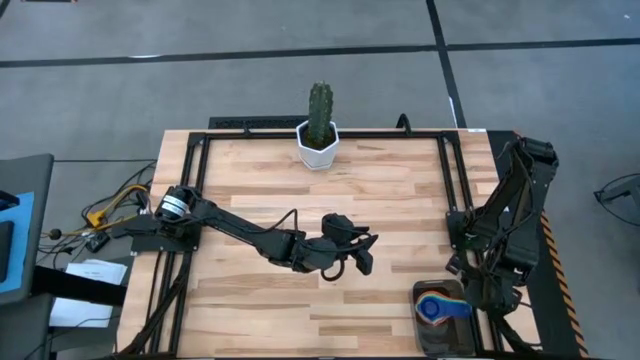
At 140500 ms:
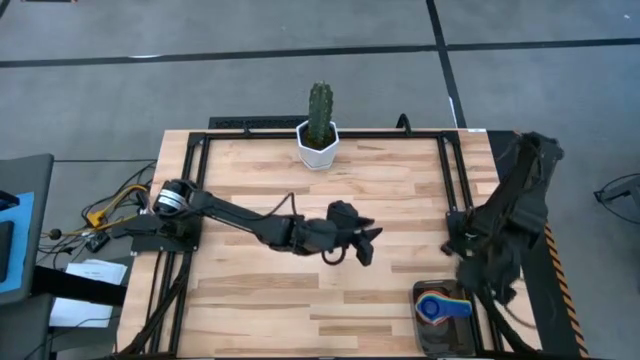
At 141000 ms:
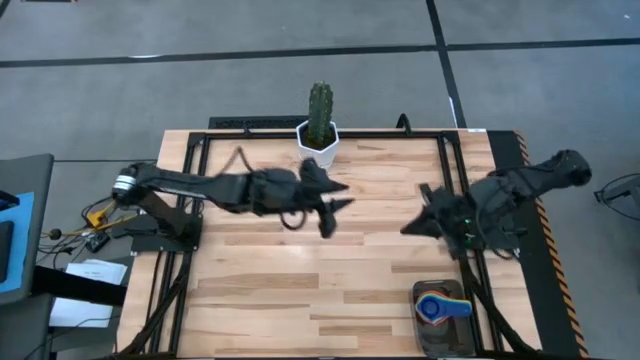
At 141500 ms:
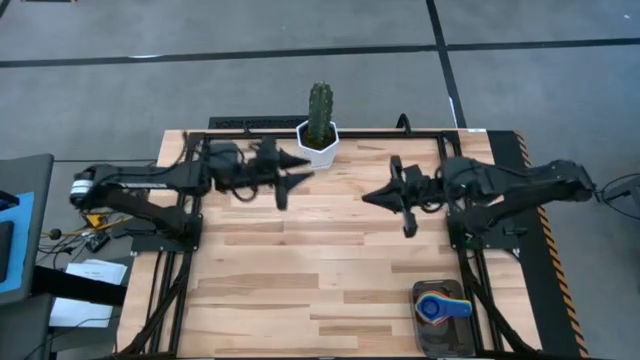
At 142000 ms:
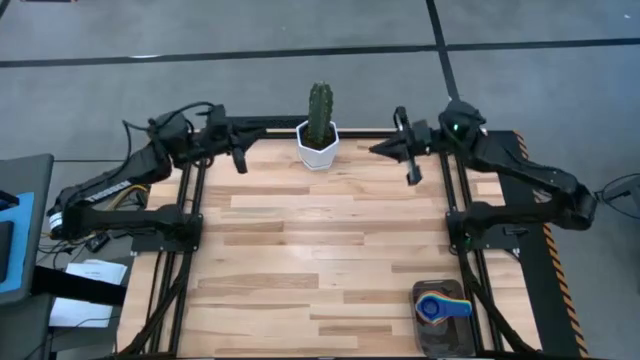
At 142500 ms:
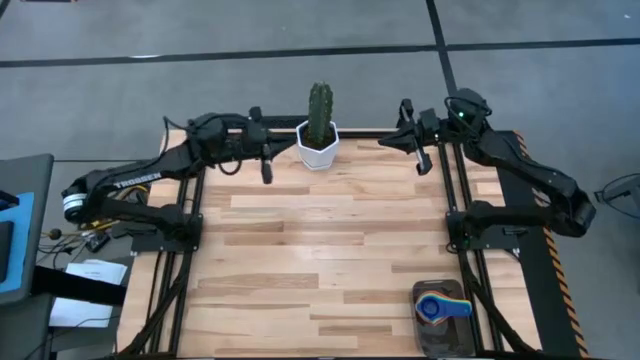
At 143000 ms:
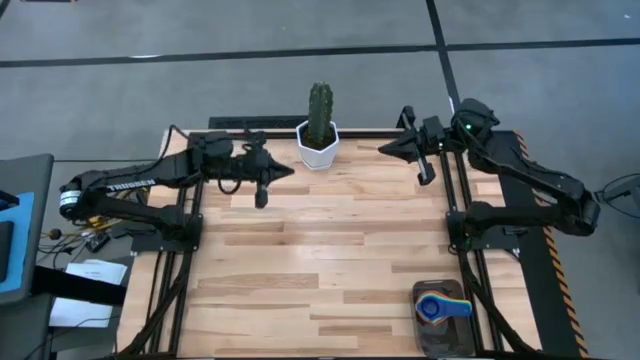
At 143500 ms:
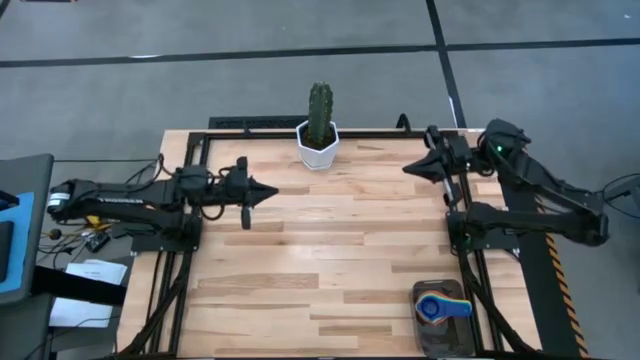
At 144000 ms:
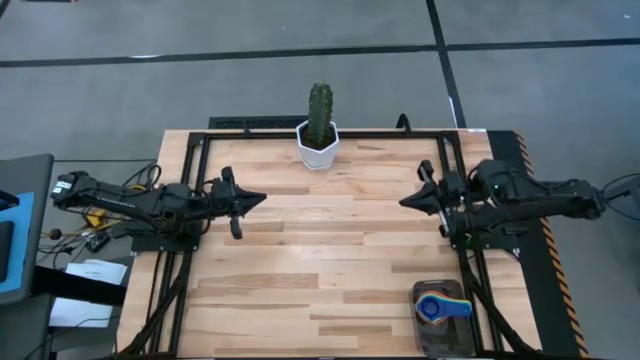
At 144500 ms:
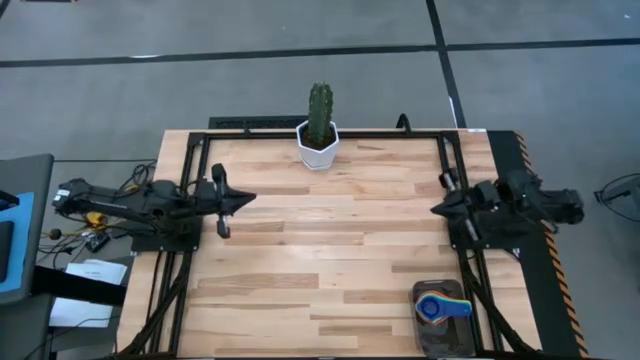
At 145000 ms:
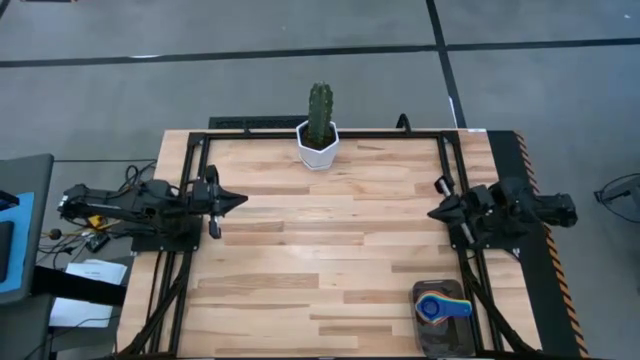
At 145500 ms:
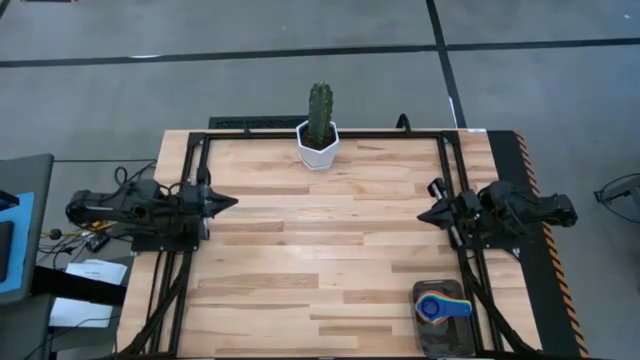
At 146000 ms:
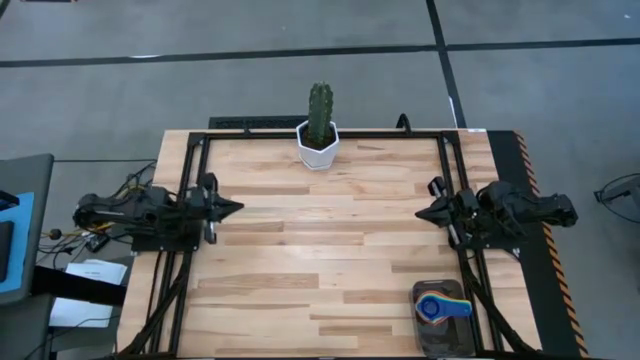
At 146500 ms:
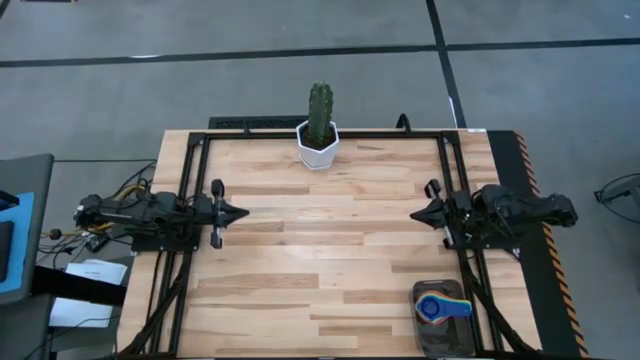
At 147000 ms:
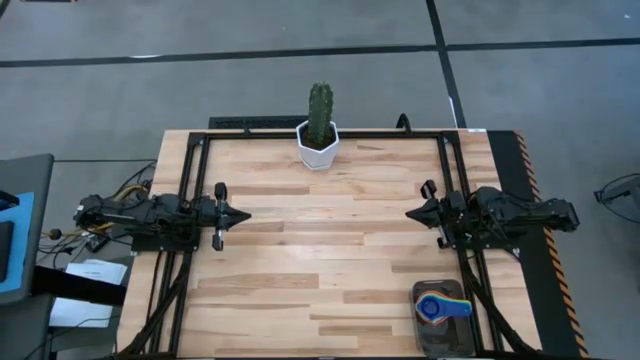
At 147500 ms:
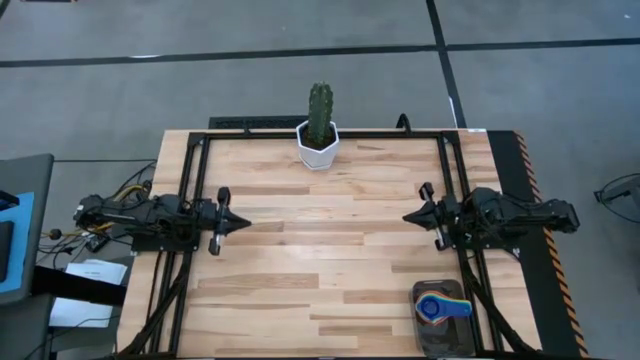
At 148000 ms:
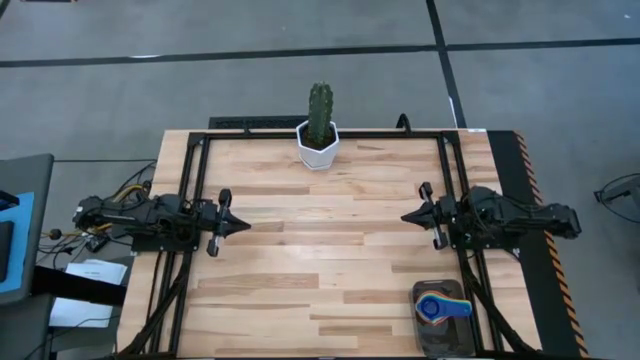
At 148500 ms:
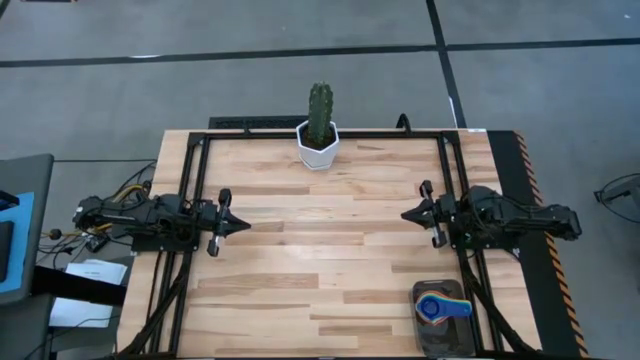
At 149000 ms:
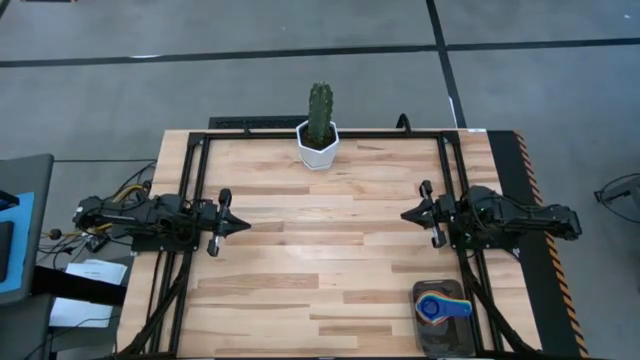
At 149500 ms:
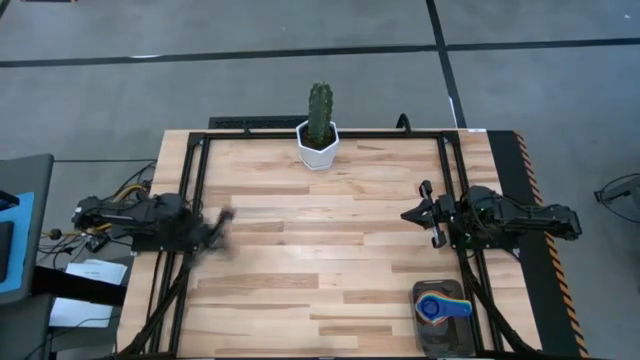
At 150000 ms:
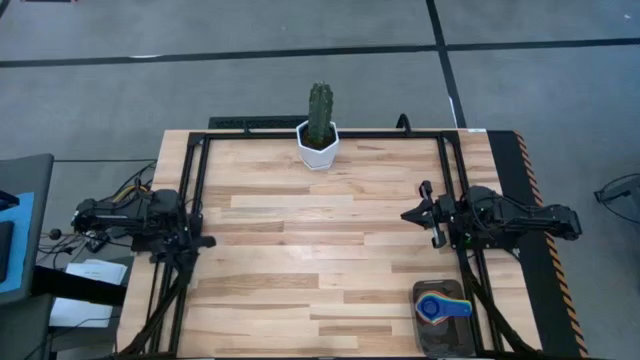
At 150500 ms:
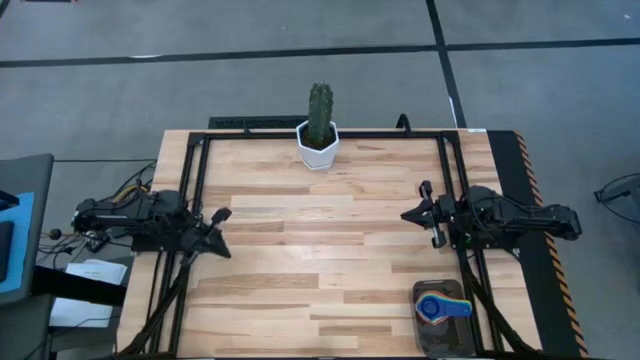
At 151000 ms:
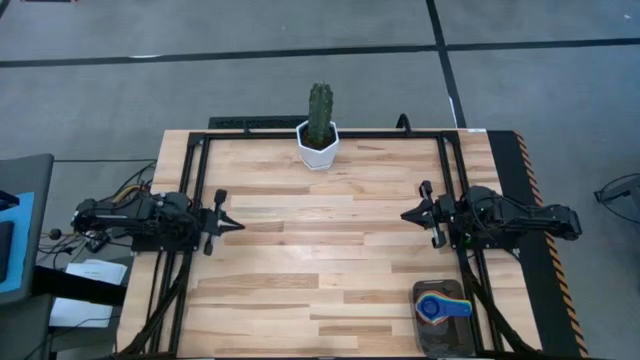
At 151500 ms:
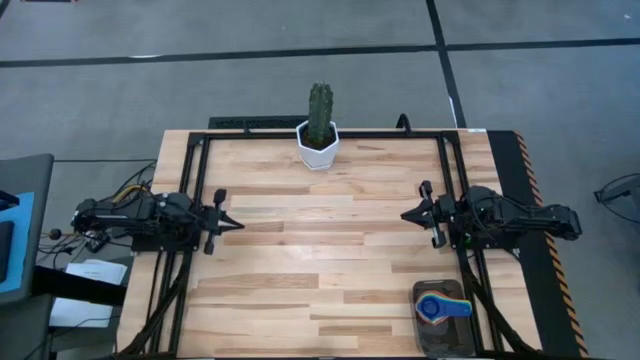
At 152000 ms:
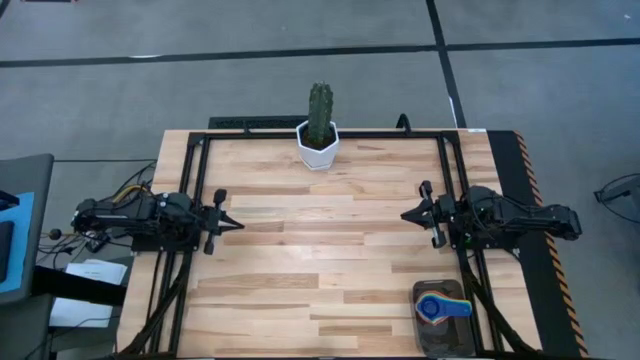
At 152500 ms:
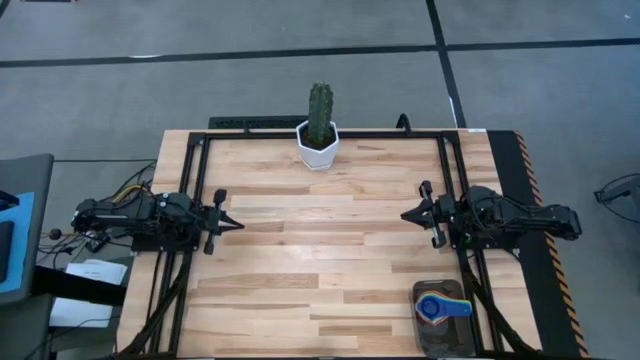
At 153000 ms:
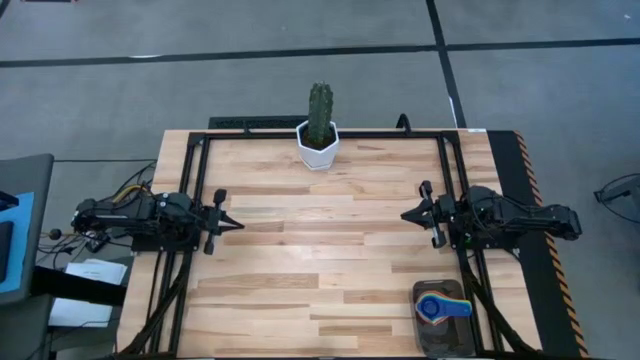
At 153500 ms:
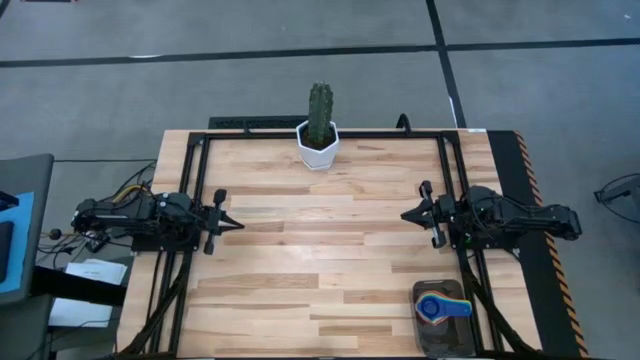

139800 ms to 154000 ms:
Task: Nest measuring cups in basket
Return to Home Position

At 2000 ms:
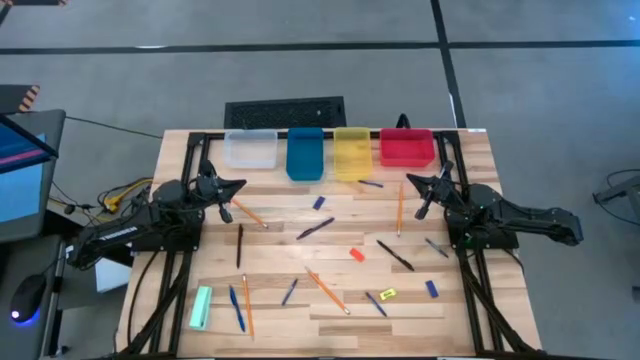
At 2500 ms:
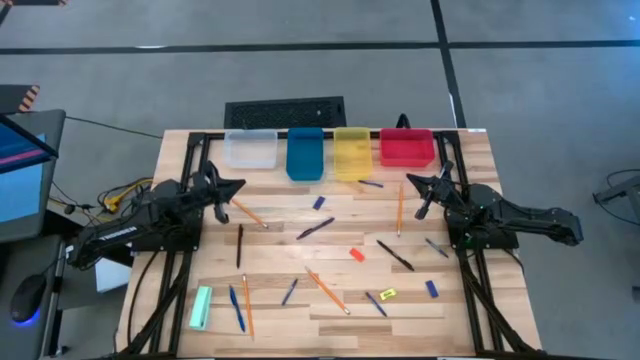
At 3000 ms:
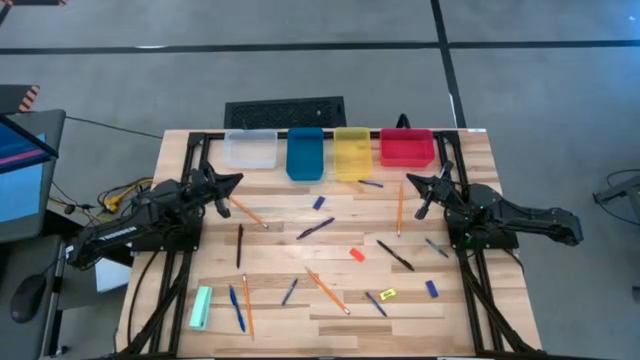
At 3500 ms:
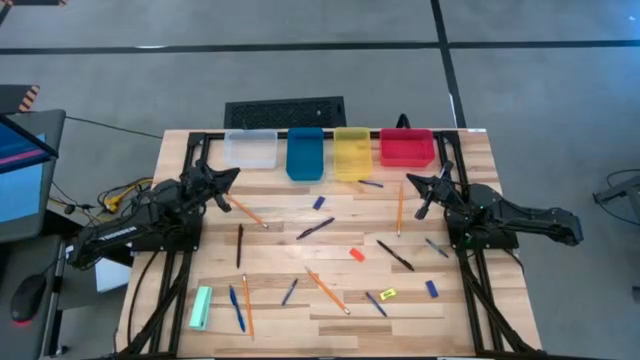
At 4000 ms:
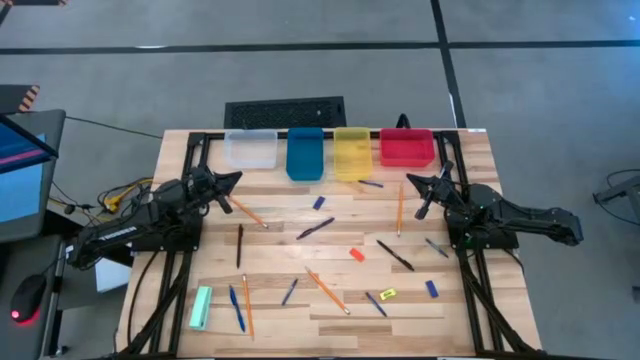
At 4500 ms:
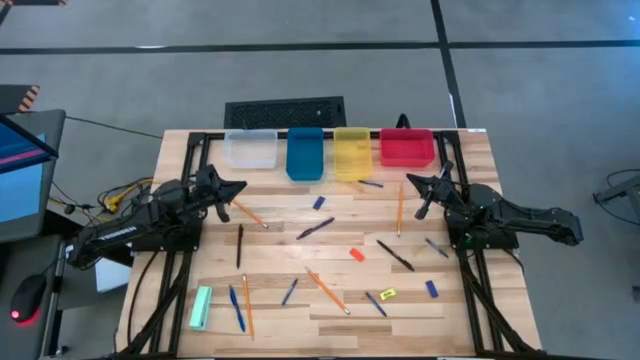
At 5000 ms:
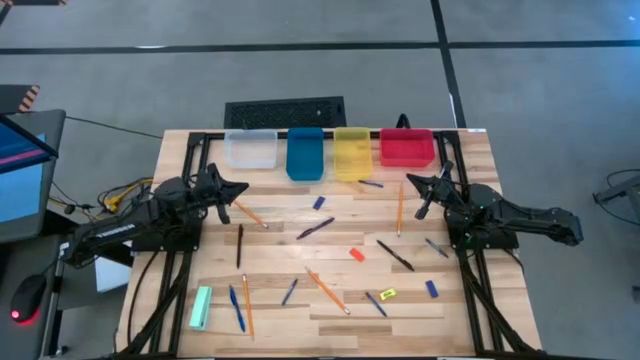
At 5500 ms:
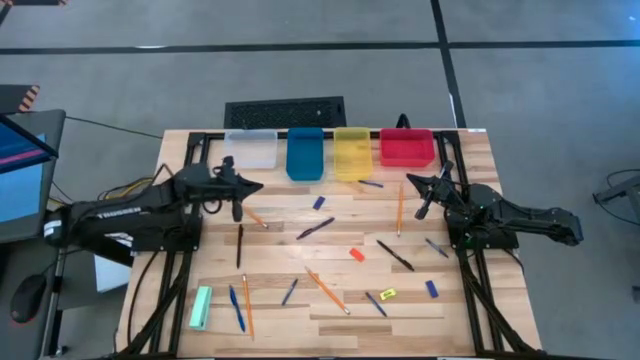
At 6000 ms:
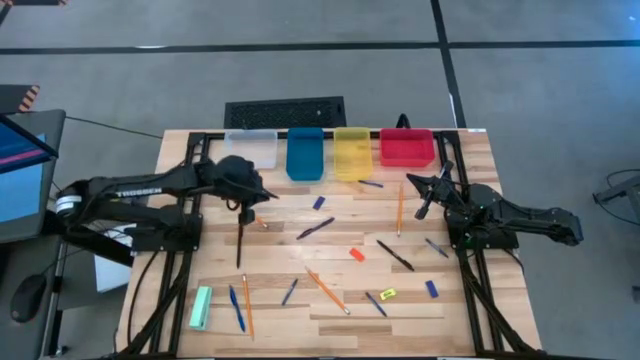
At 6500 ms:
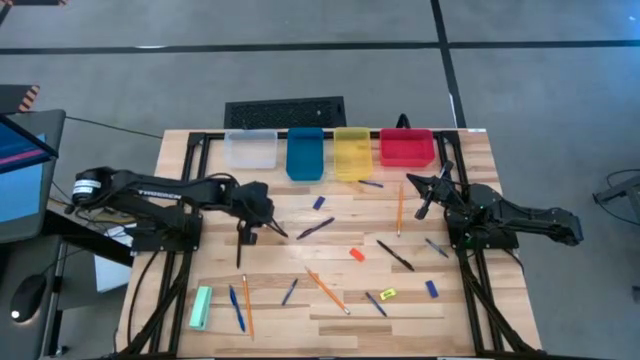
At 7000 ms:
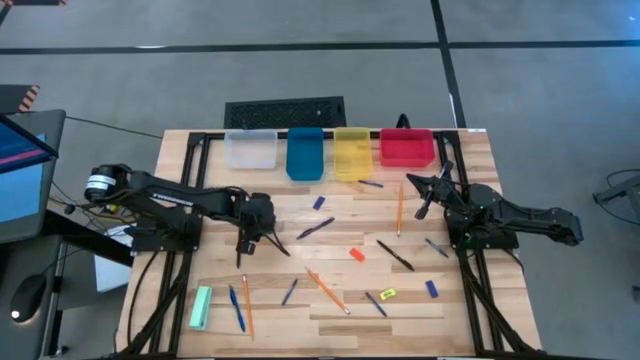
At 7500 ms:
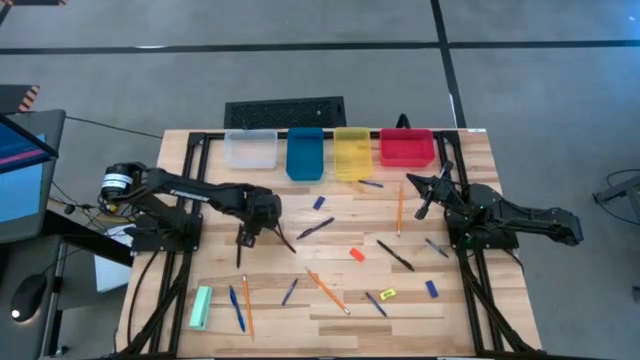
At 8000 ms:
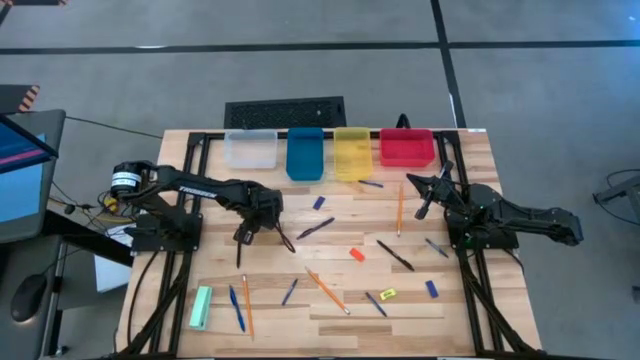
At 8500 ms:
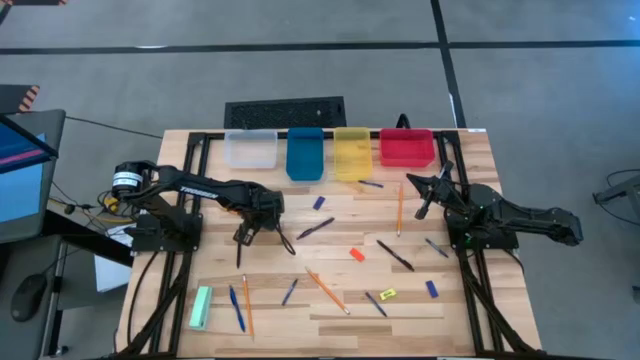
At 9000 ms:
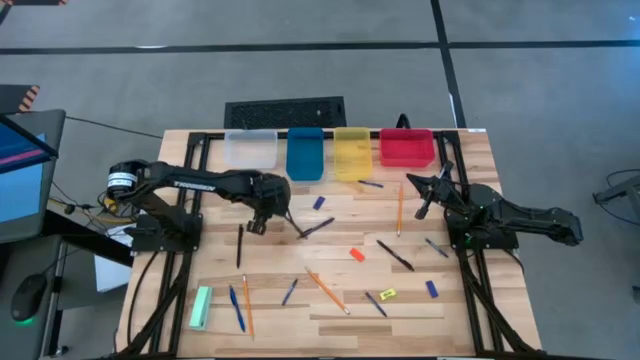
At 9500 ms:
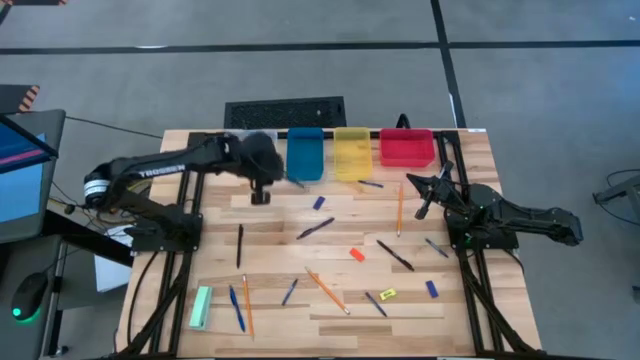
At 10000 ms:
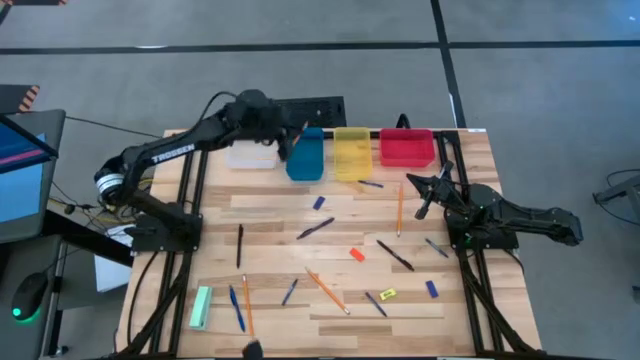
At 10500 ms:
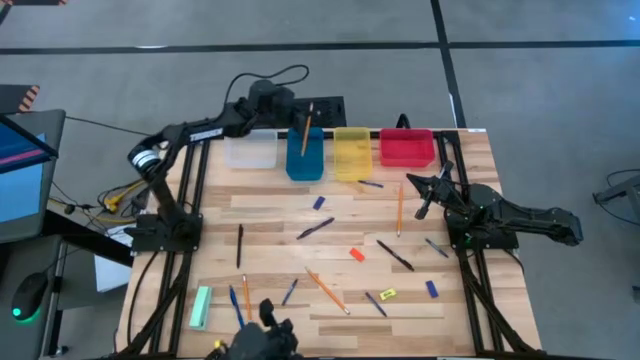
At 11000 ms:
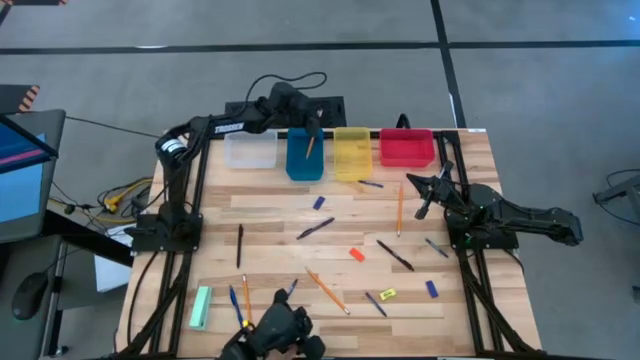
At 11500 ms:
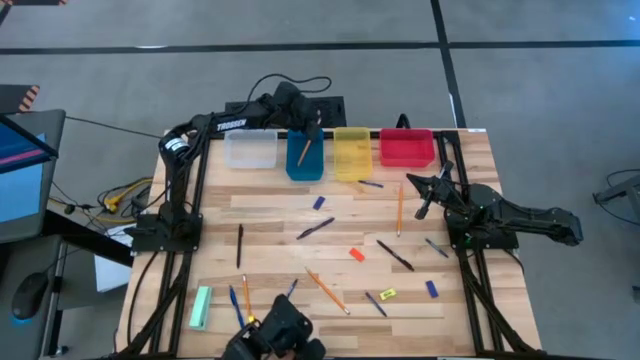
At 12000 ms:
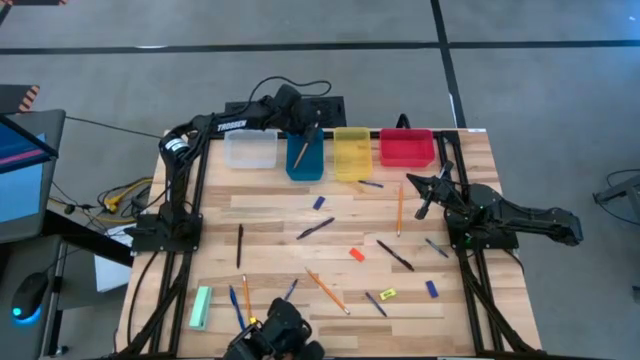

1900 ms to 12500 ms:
Task: Sort crayons/erasers/pens/pencils in bins
Put the orange pencil into the blue bin
